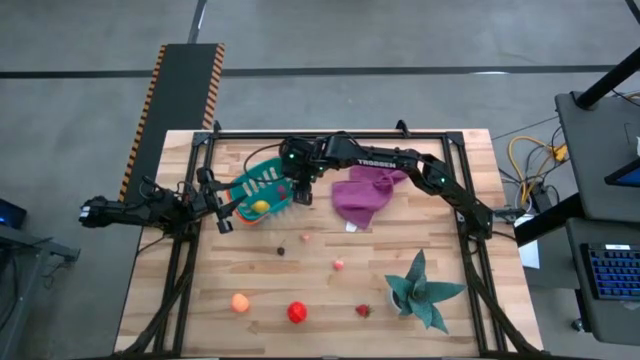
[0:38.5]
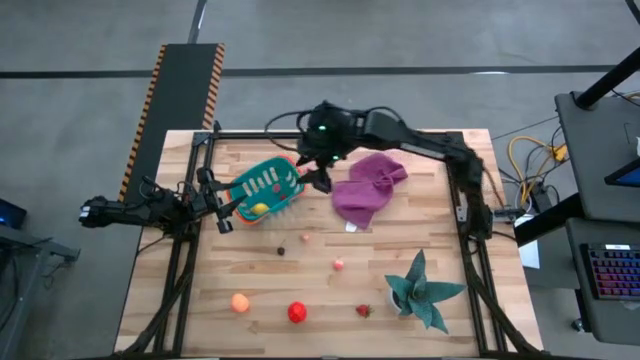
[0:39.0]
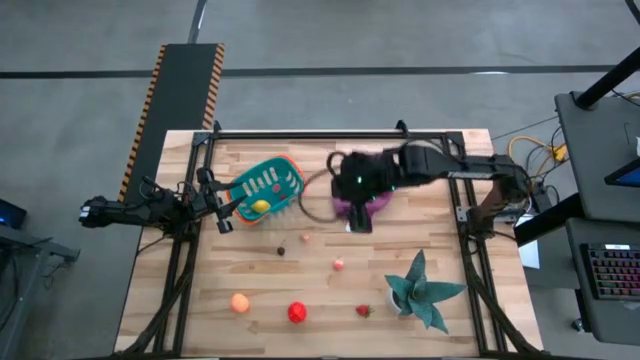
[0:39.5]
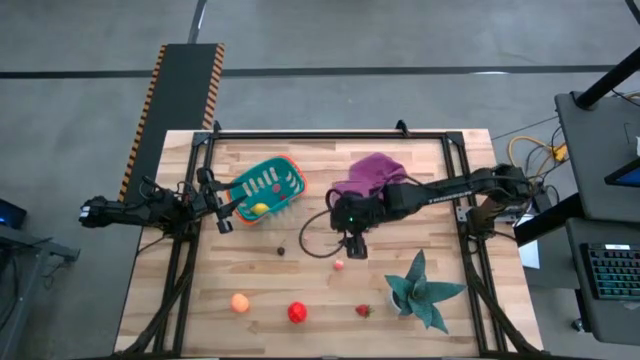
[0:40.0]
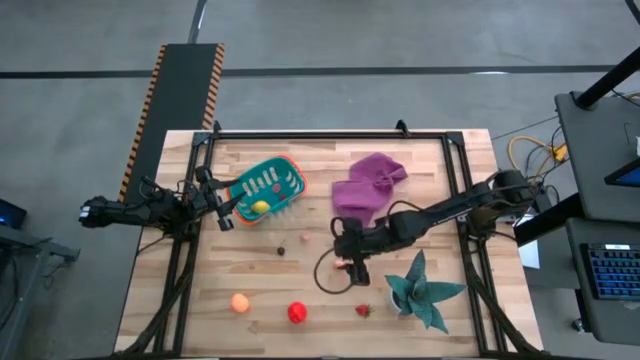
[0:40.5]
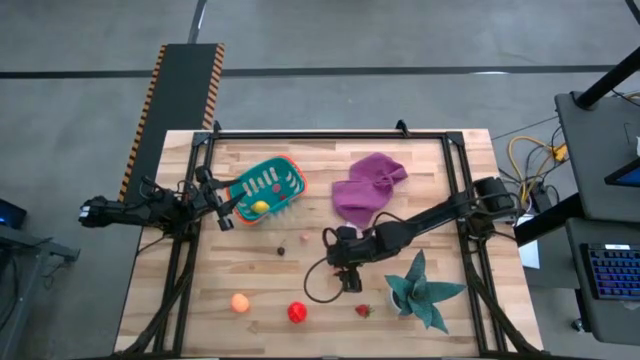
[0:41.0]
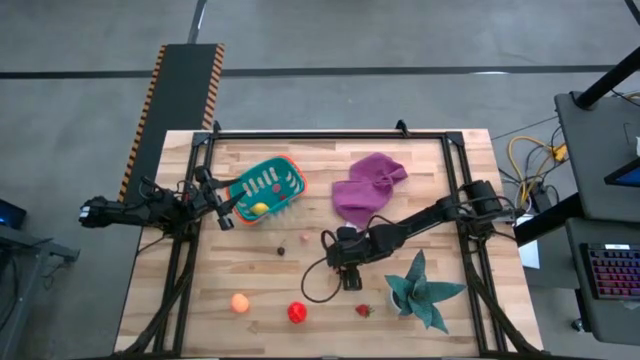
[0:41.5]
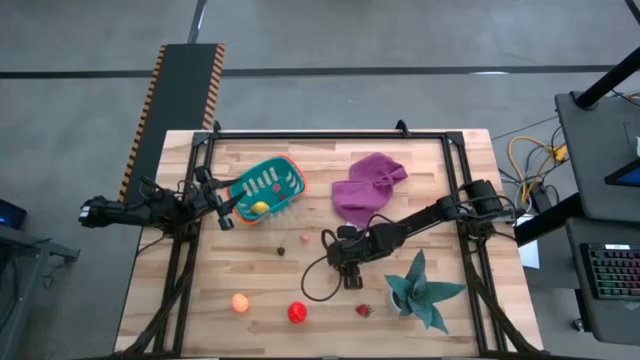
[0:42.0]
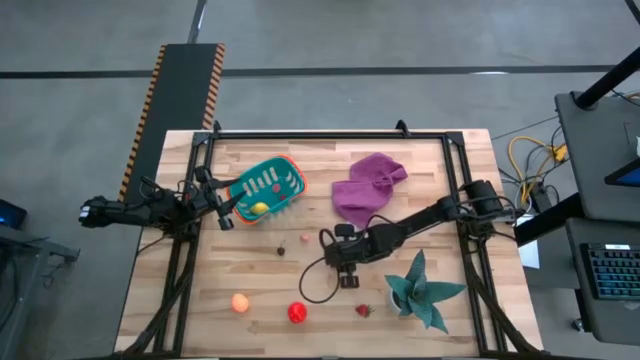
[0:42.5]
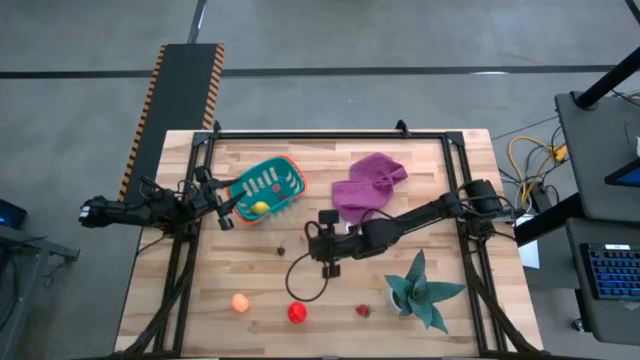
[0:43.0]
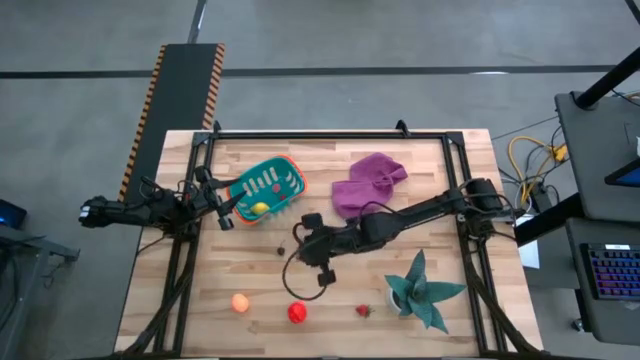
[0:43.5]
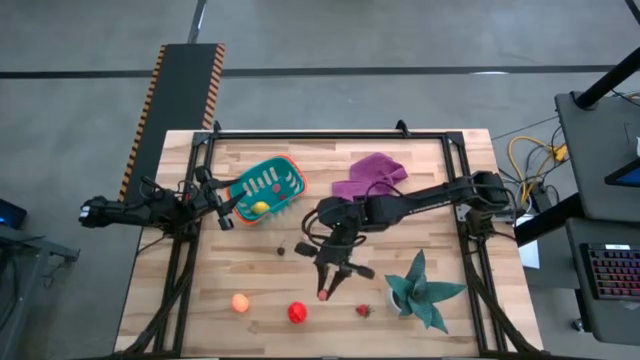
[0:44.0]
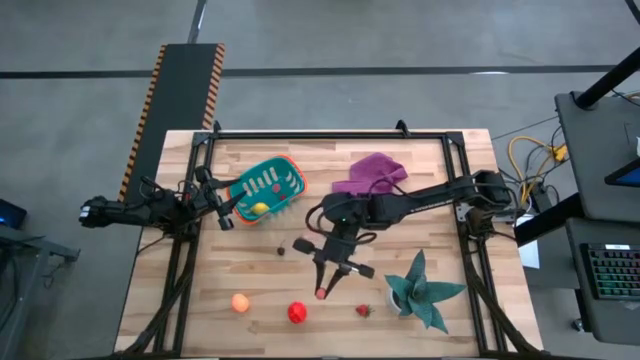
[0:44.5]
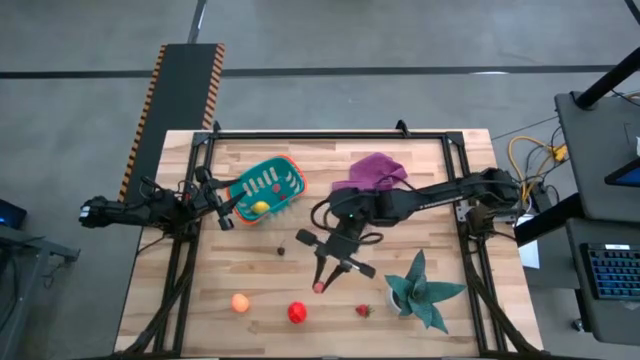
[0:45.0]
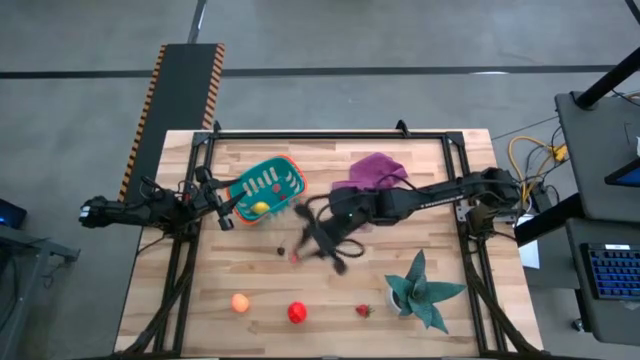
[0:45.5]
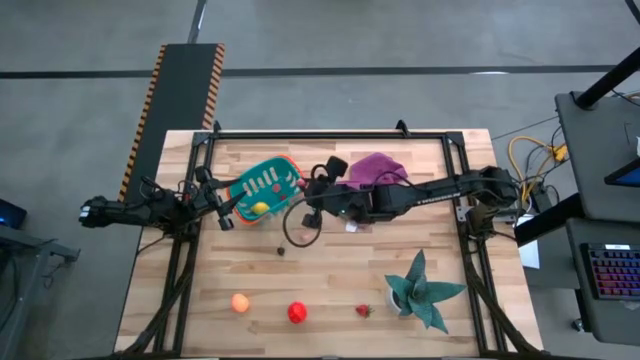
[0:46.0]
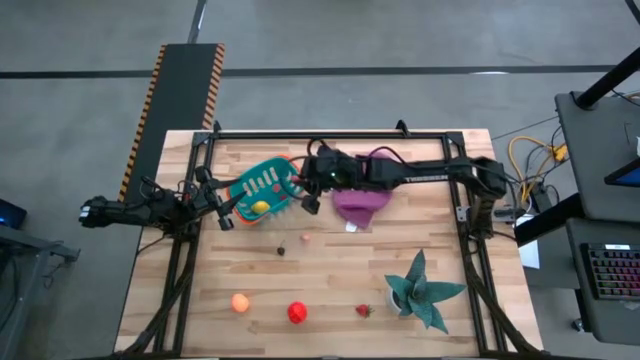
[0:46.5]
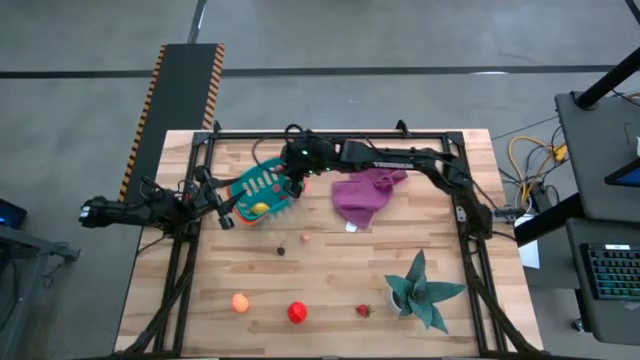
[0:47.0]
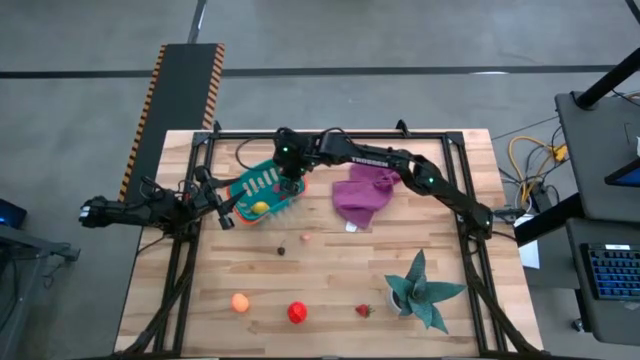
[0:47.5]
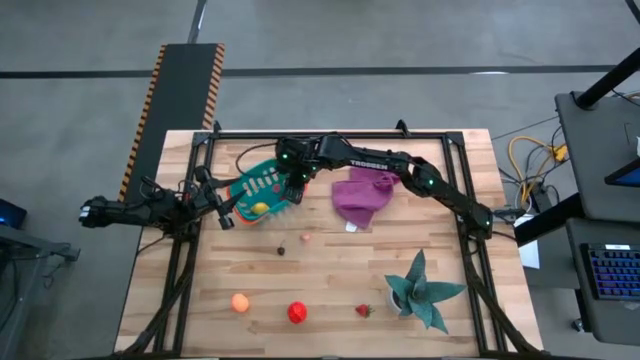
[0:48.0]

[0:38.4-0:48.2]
Task: Pick and placing Produce into tupperware
Put the pink peach into the blue basket

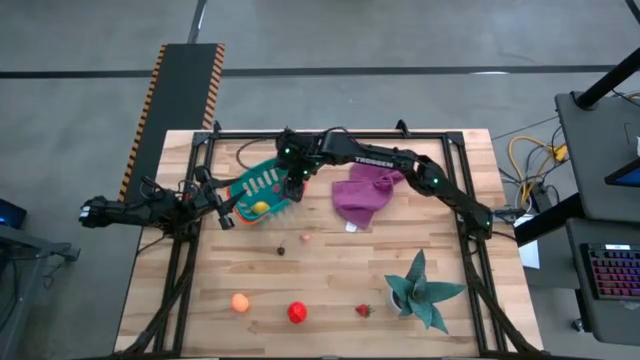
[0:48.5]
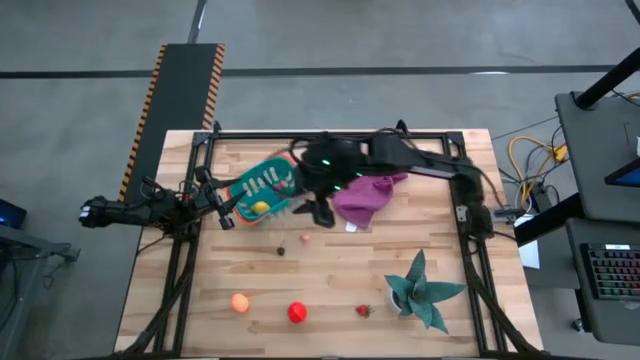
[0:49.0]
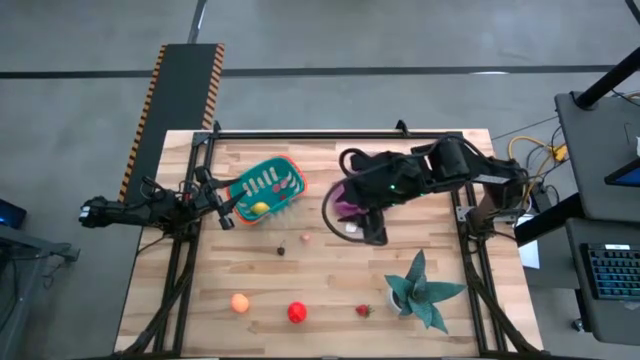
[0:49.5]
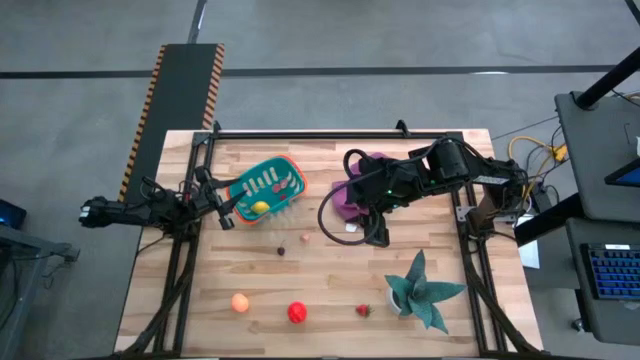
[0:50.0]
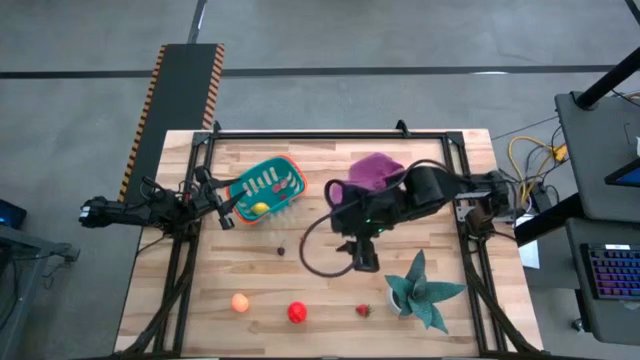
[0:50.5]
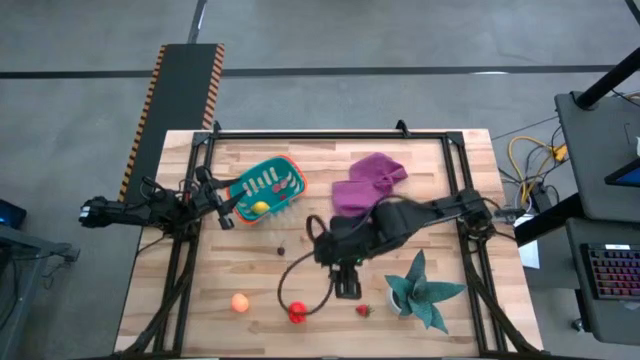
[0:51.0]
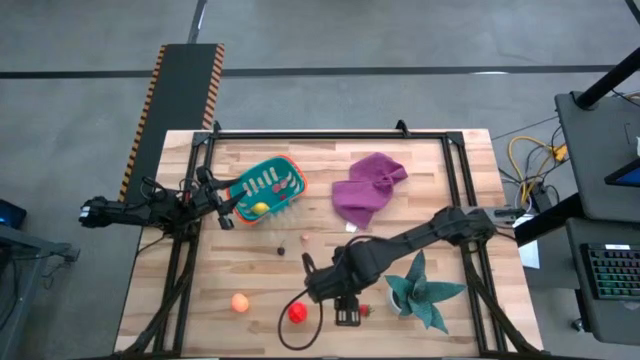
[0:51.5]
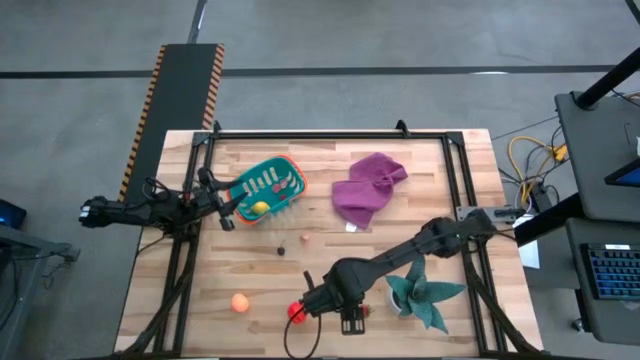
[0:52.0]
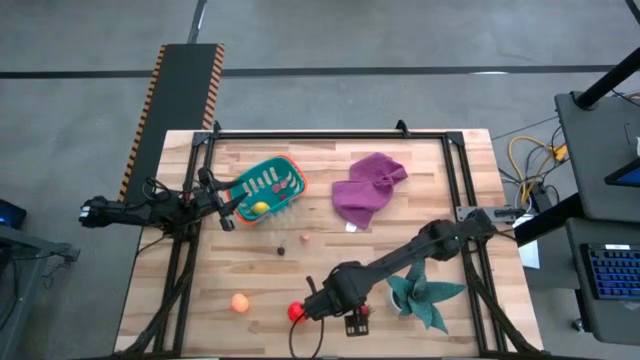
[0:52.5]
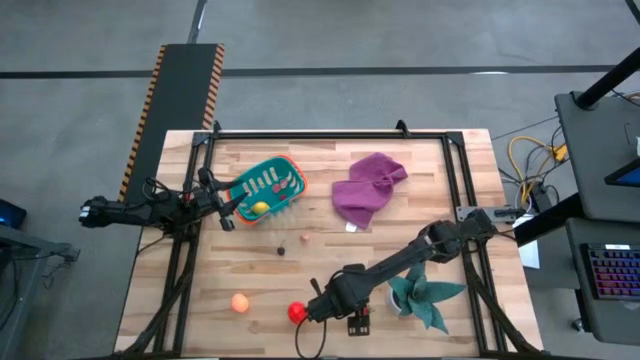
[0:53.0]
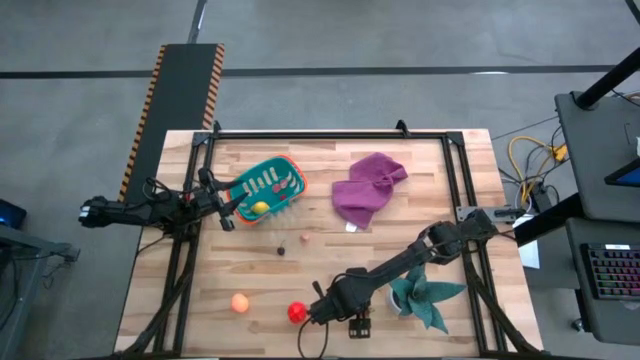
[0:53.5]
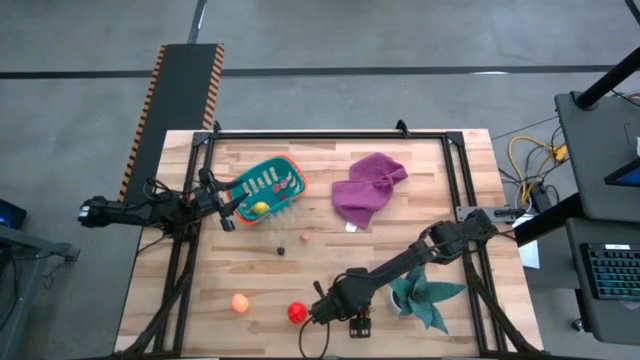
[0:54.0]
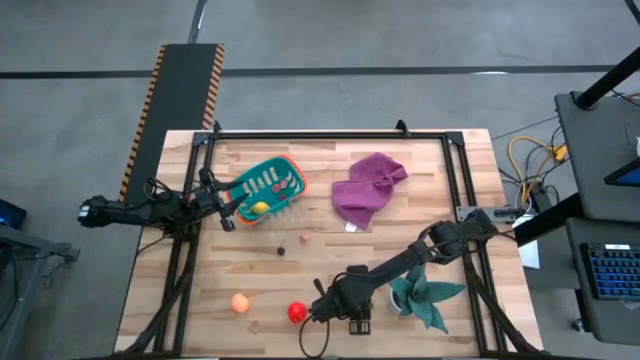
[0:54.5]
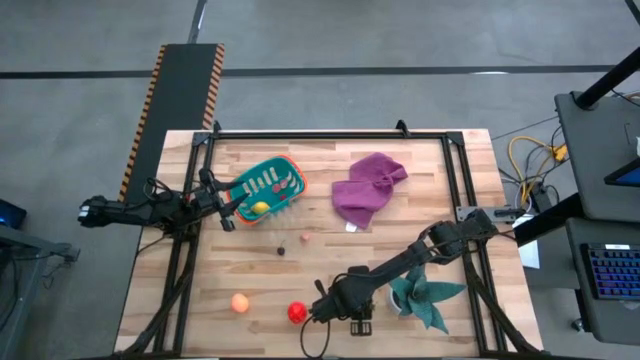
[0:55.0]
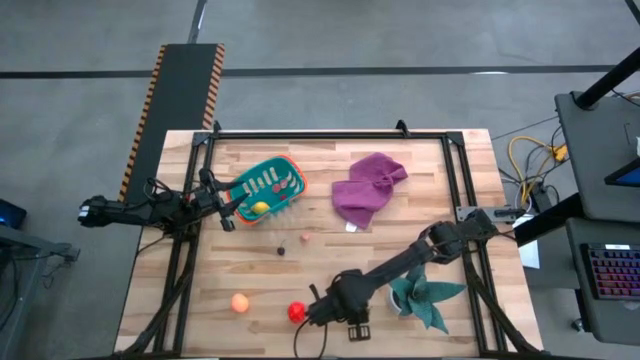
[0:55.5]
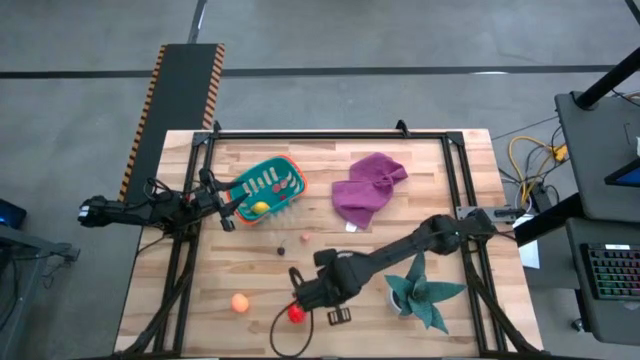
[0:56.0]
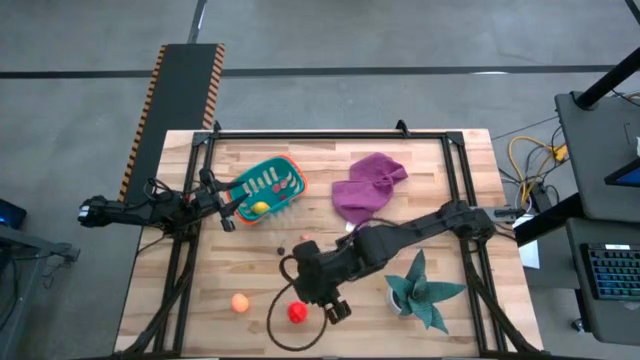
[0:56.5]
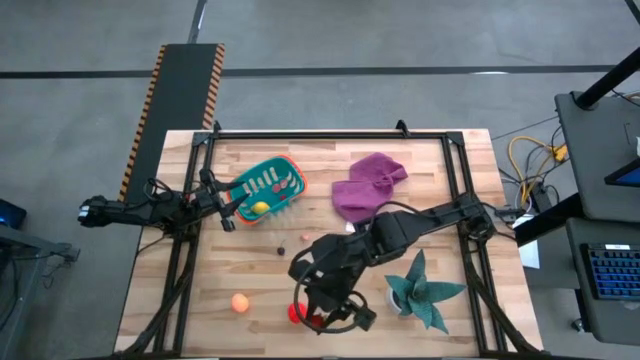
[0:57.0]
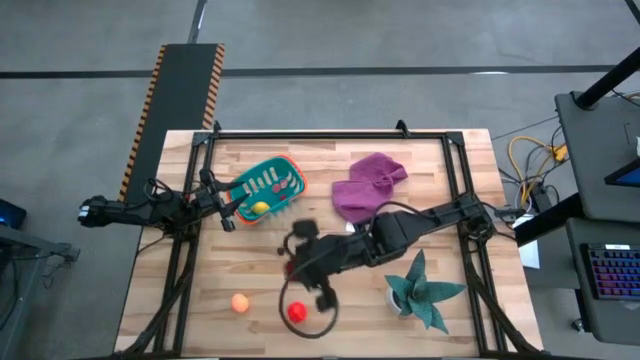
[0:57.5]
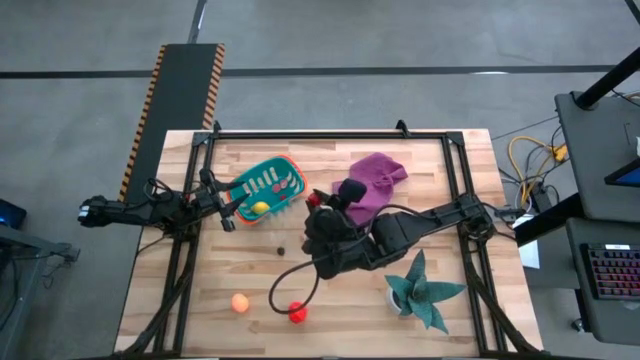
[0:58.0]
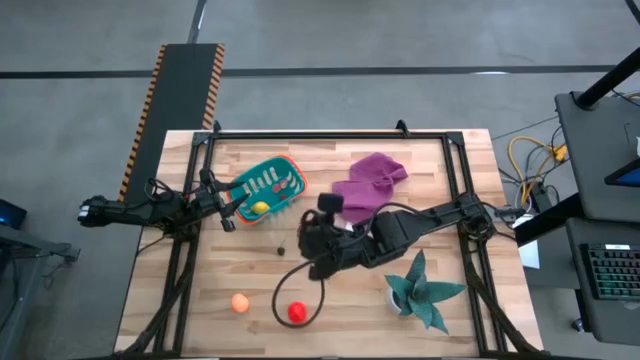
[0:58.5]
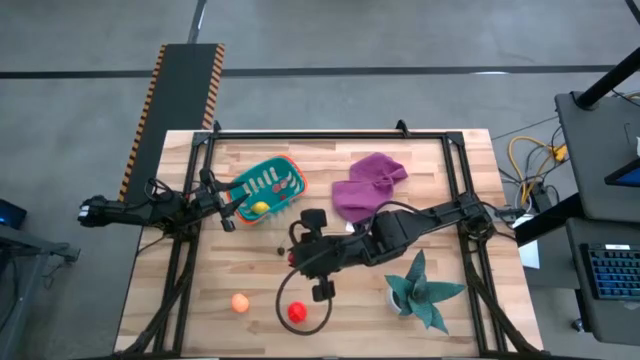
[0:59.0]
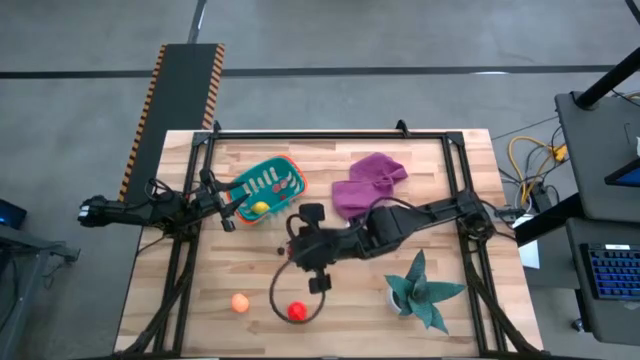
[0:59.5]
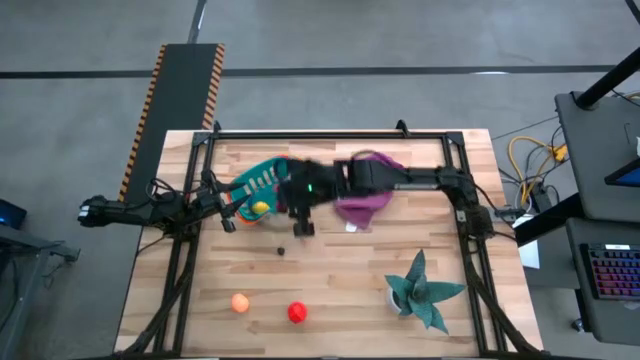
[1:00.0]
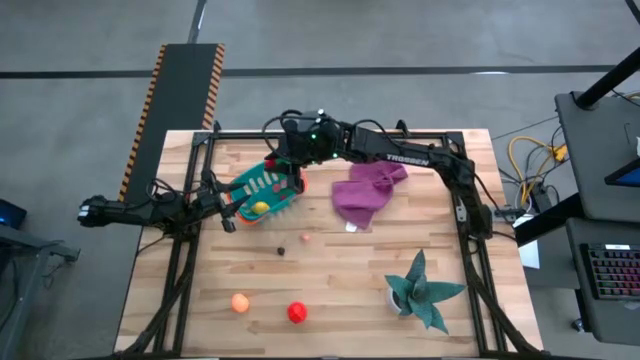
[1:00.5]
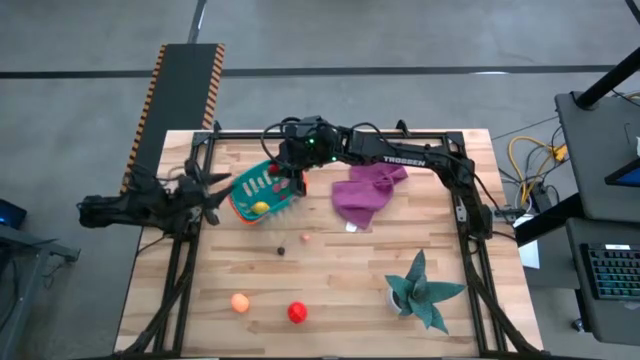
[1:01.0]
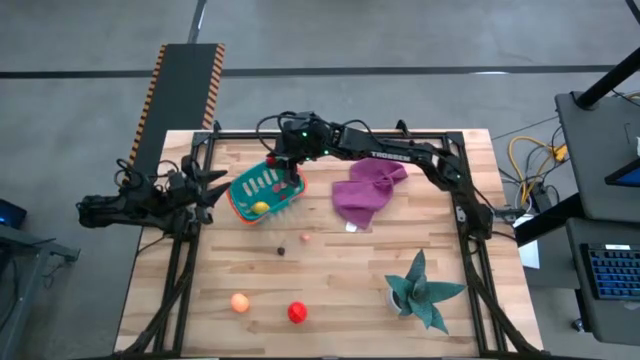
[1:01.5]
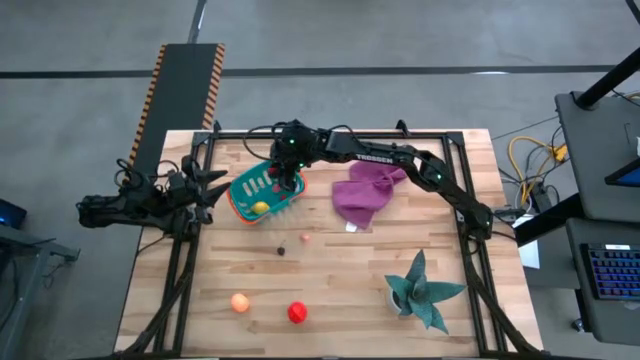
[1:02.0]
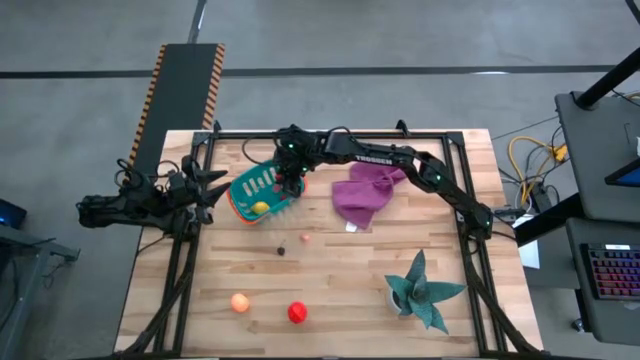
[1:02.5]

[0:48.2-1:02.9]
Put the red strawberry into the blue basket
